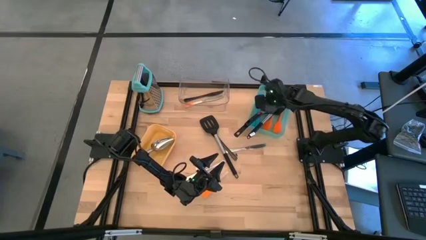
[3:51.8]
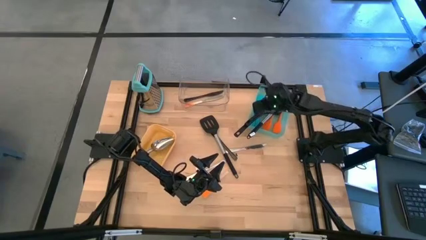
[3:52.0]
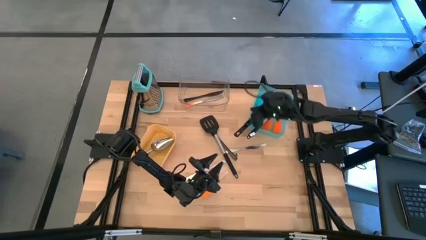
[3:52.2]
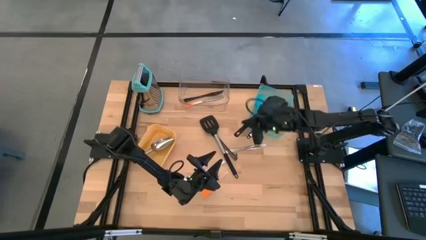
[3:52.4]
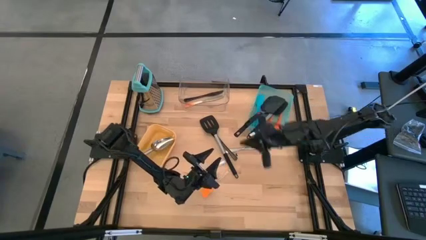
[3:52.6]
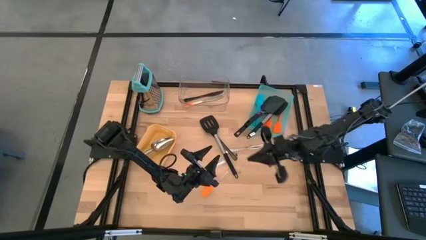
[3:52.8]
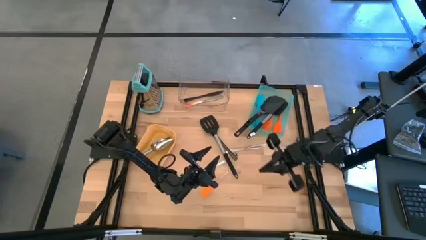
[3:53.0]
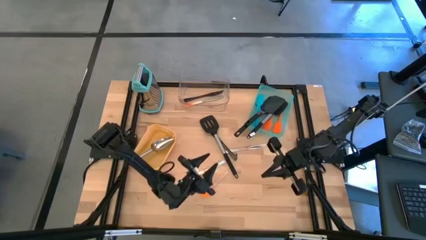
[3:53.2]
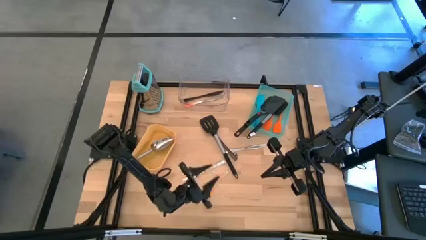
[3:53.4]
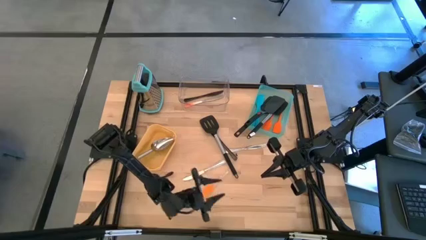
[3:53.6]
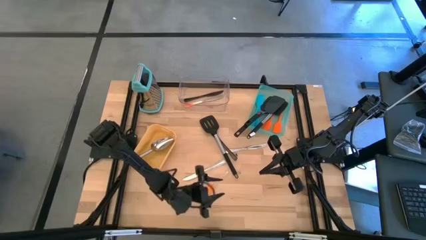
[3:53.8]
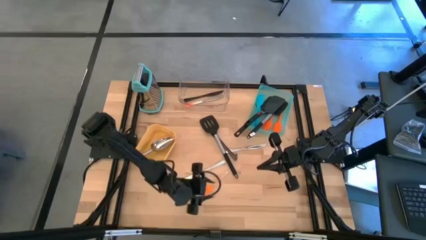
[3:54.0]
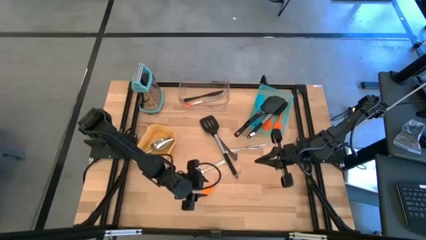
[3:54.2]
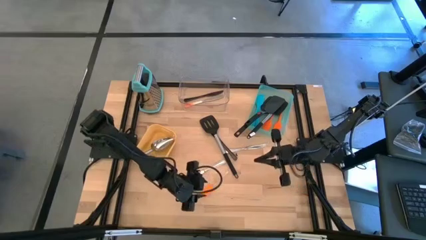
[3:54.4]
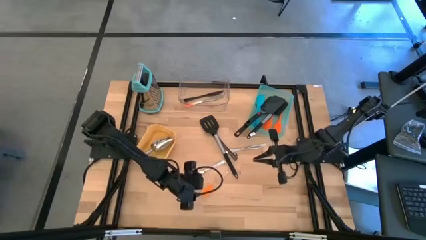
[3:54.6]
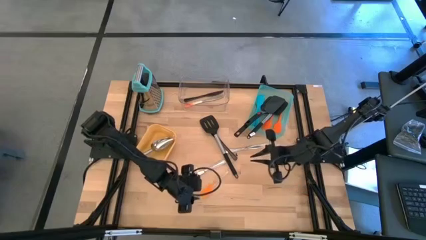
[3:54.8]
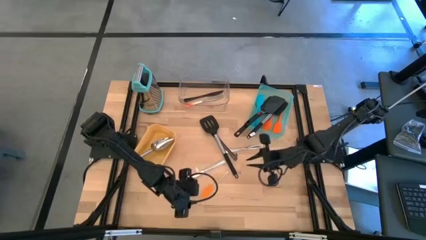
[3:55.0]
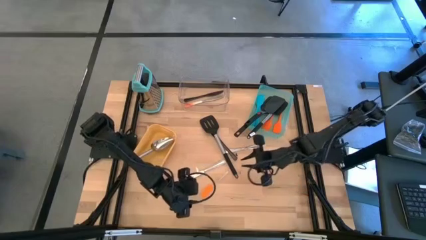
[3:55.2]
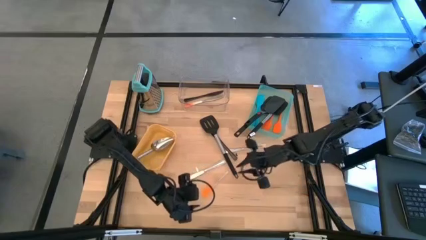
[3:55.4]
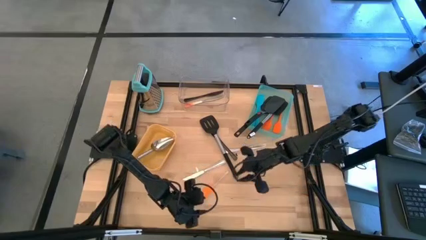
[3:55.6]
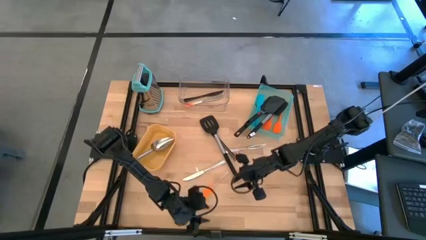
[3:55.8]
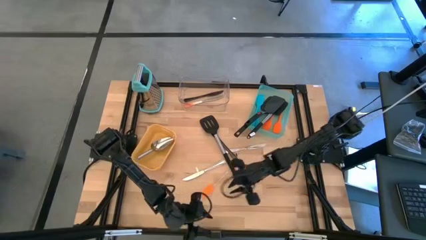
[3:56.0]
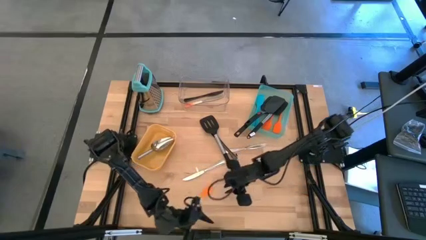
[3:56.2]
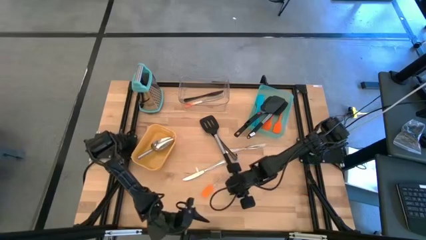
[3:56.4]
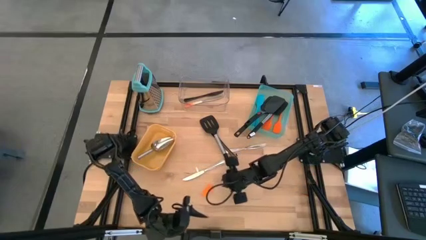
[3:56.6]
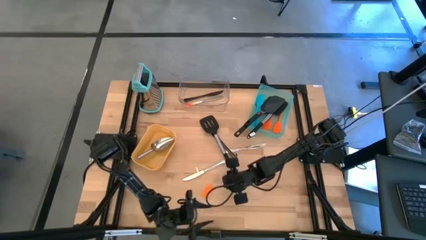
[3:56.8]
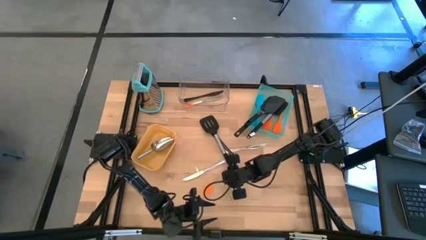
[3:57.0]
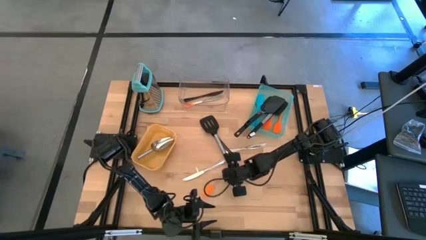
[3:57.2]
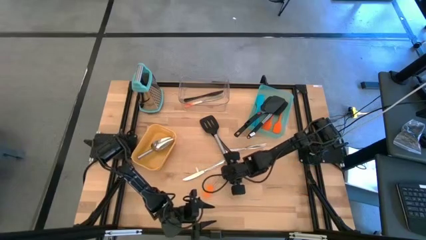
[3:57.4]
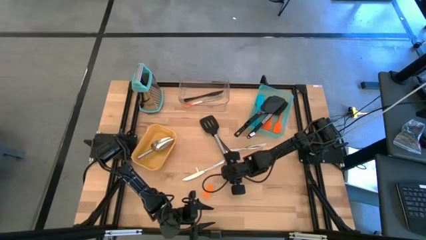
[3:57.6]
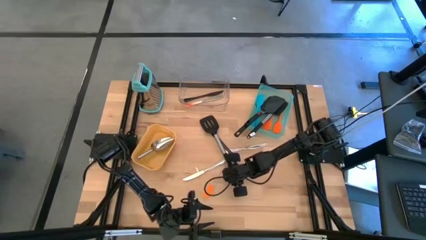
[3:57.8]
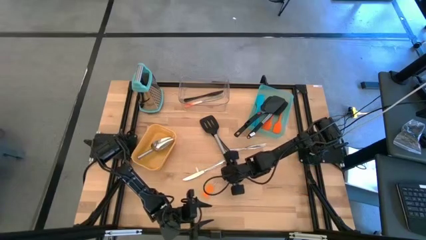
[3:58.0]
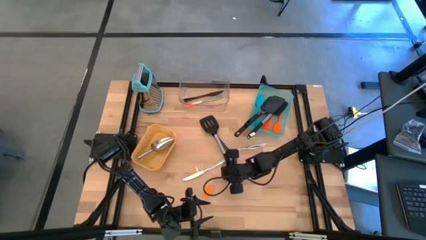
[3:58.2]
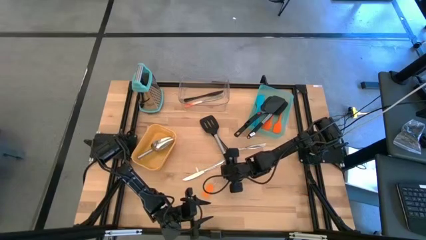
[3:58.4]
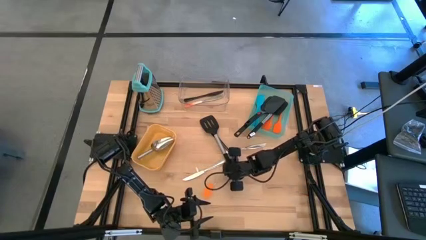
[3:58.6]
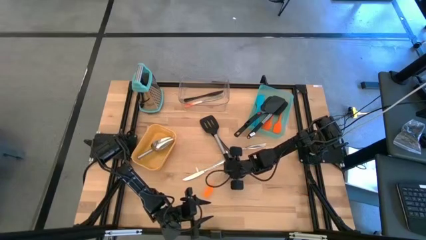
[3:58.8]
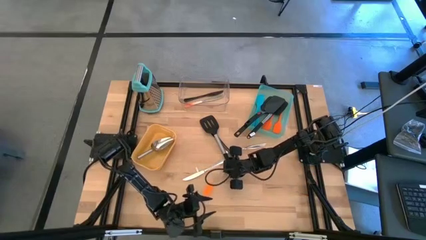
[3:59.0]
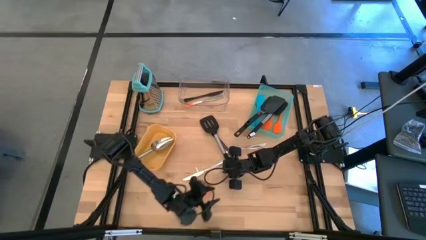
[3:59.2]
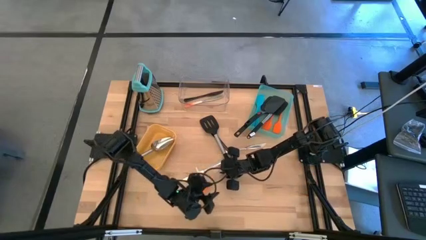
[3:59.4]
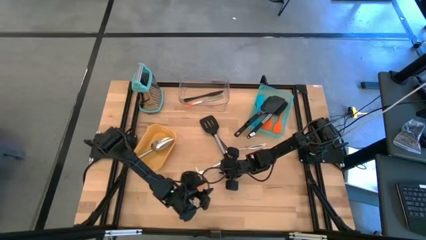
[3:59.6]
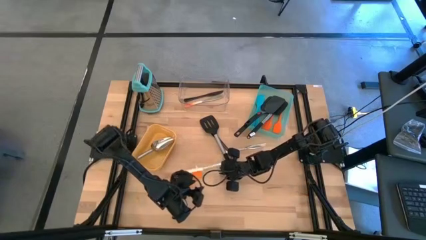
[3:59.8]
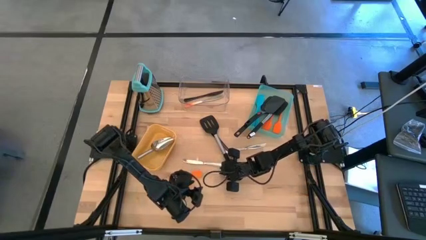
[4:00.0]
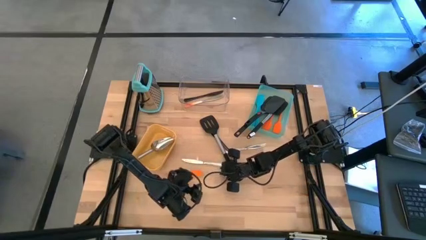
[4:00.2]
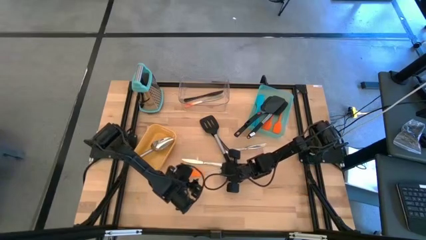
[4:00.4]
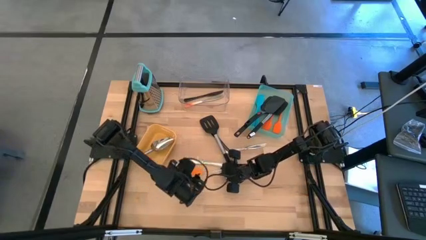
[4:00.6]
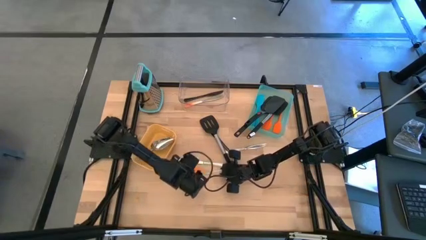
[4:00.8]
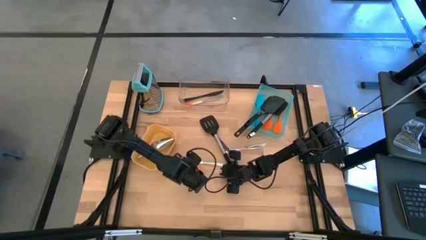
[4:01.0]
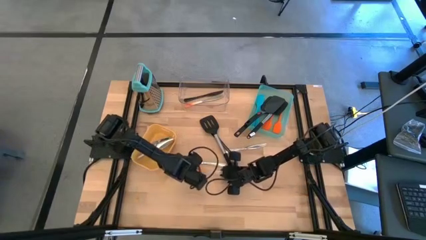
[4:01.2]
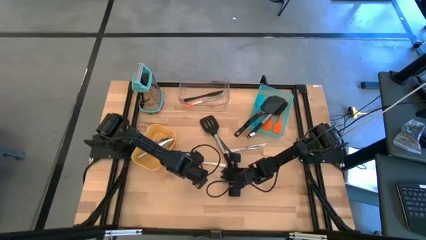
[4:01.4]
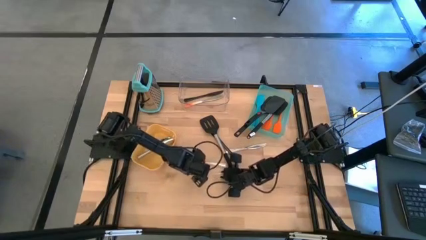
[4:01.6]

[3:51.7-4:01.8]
Task: Pick & Place Kitchen Items
Put the orange spatula into the green bin

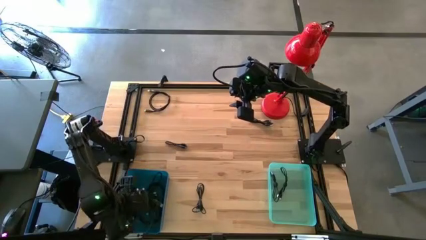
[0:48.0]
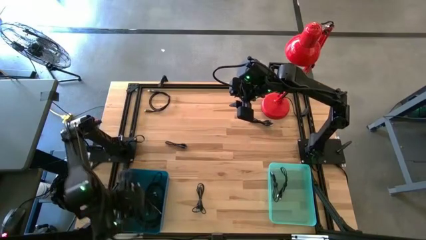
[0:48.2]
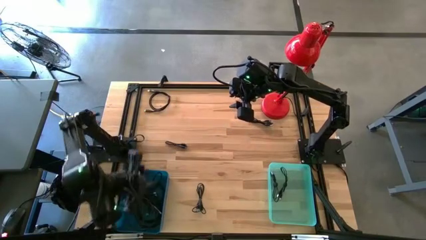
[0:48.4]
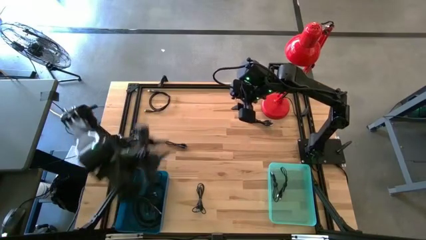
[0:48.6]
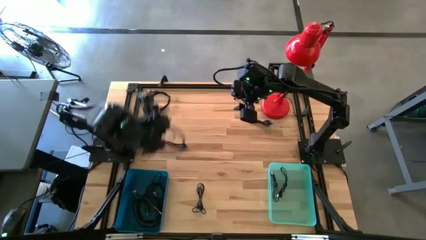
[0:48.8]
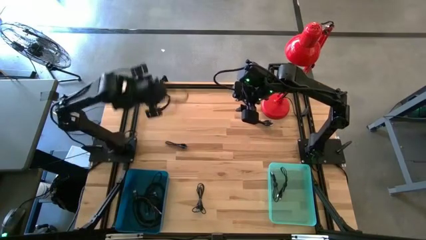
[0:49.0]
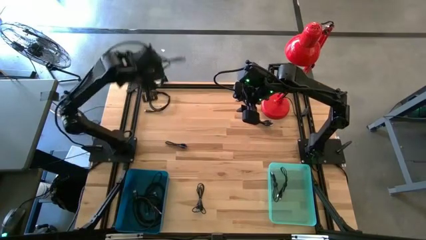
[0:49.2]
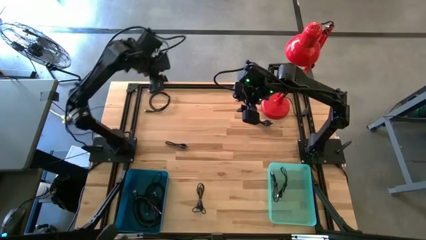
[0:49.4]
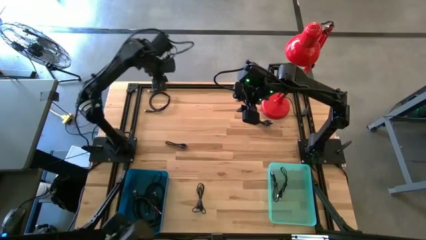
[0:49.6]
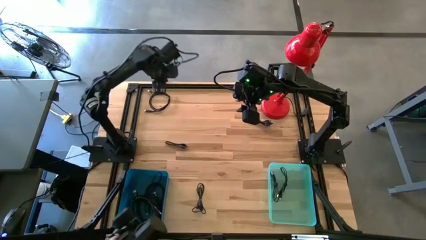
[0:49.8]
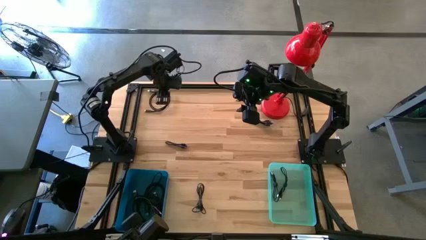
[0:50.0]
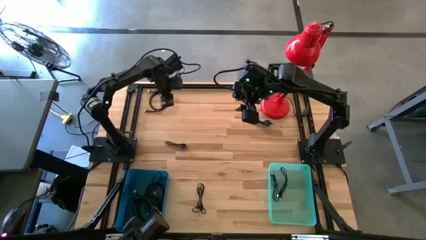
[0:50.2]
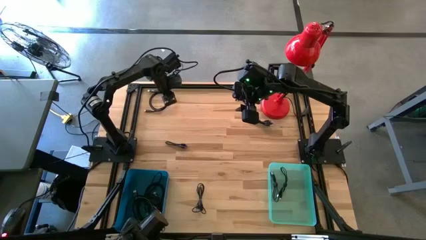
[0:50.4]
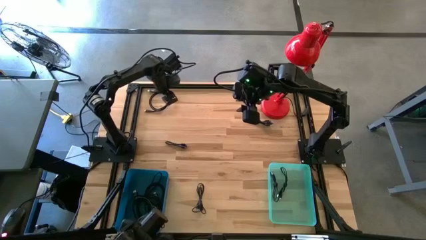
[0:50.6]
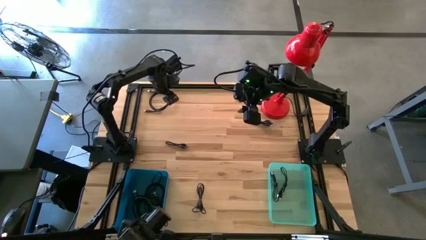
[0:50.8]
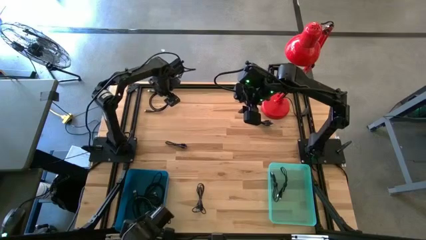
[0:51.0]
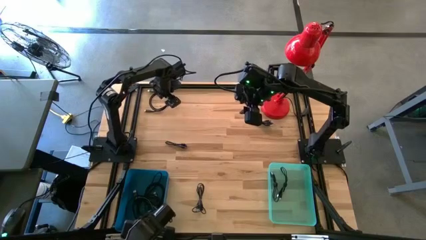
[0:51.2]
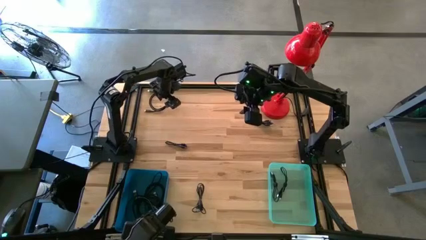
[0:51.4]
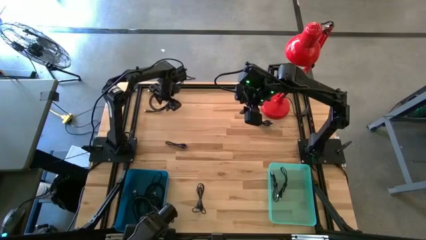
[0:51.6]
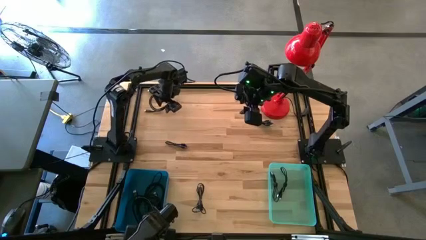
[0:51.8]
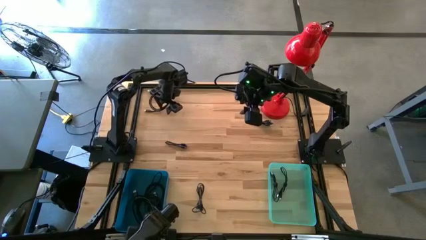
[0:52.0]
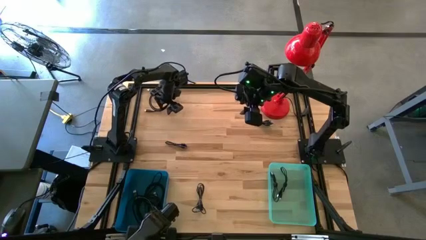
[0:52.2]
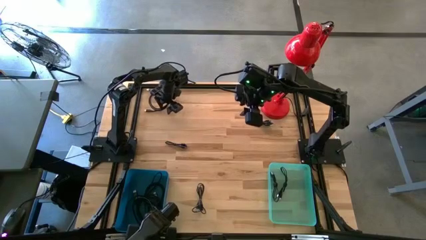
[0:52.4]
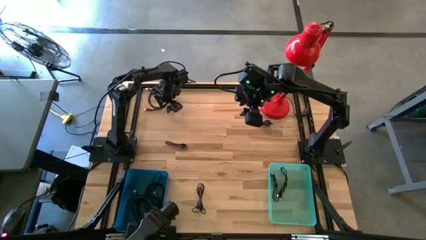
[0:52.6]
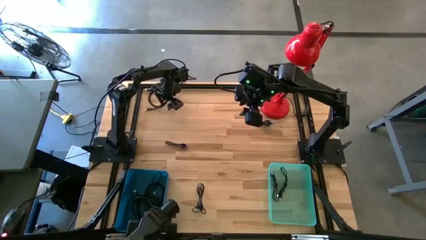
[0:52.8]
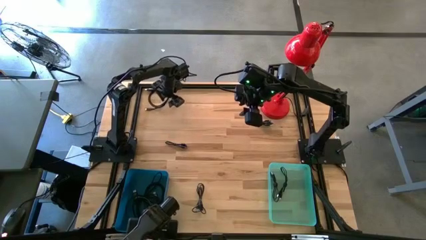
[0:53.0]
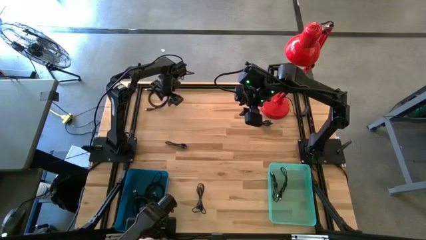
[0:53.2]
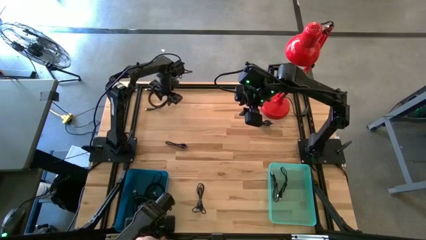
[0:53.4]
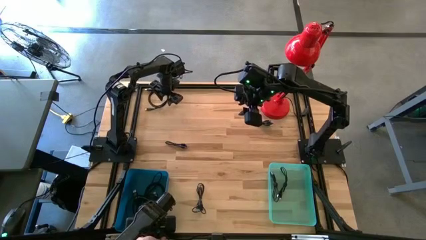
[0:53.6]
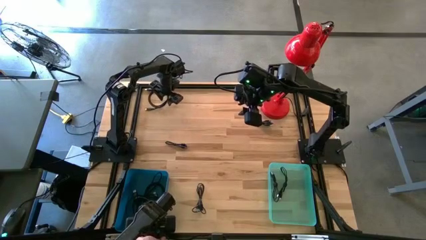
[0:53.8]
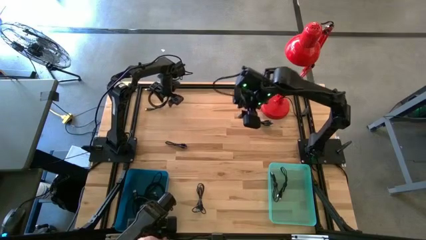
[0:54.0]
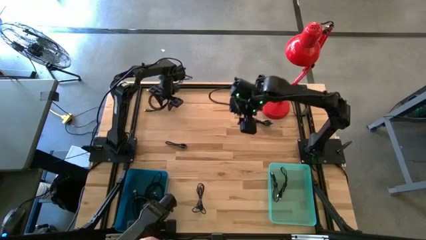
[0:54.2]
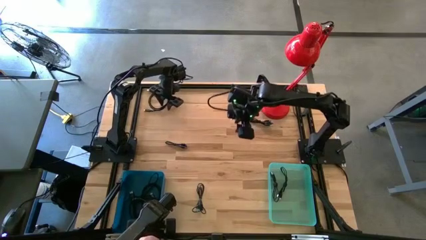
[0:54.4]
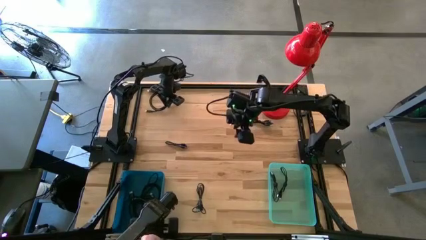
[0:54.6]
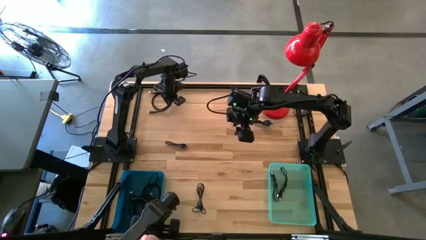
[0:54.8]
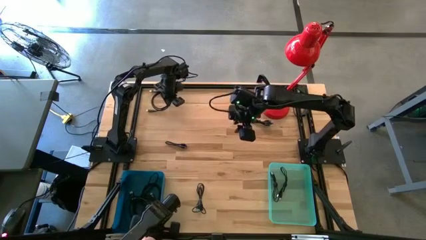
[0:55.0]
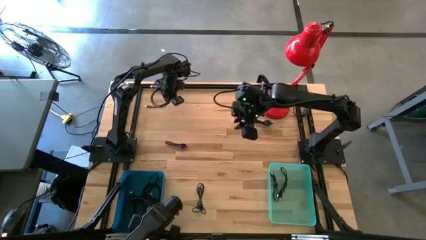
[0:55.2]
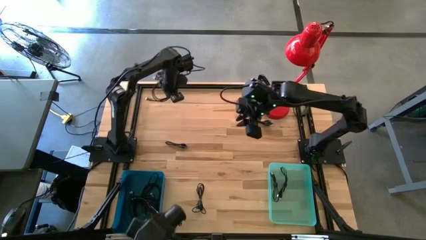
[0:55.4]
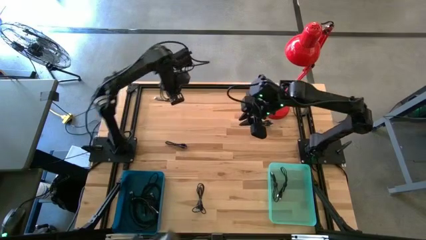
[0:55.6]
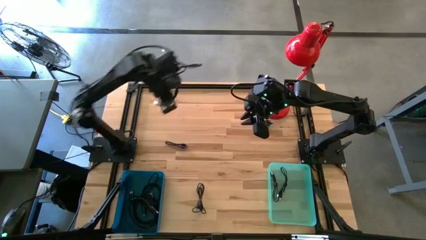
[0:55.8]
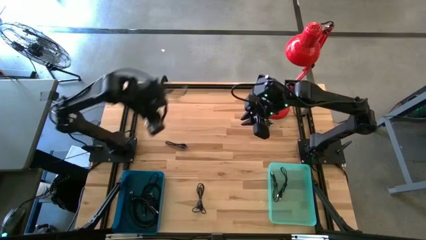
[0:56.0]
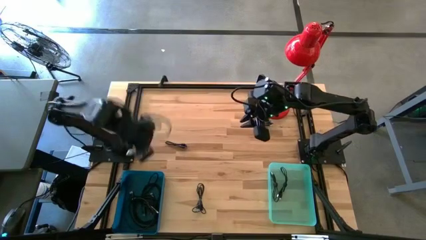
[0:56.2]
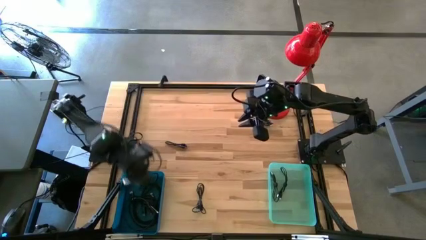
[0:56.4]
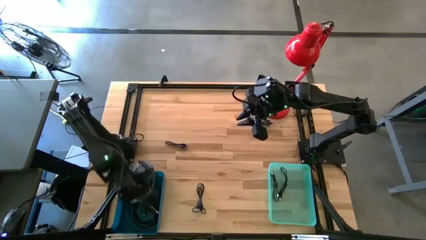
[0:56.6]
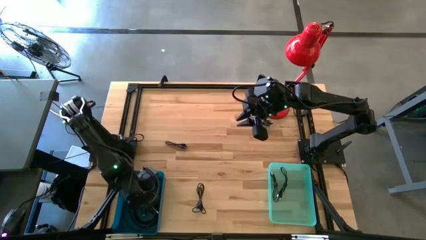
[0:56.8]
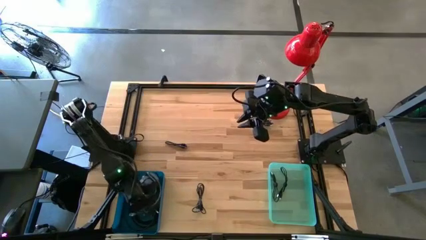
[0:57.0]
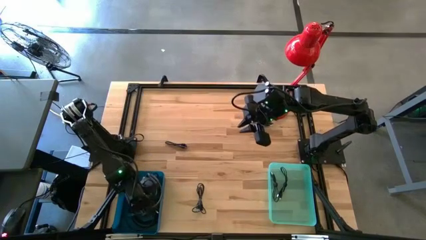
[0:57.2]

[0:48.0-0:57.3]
Task: Pick & Place USB Port
Put the black USB cable into the dark blue bin
